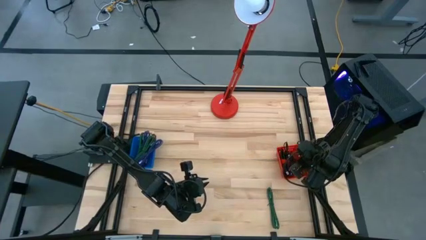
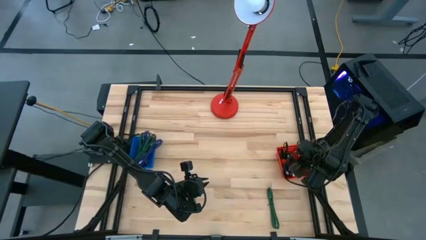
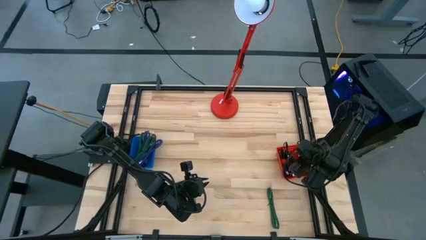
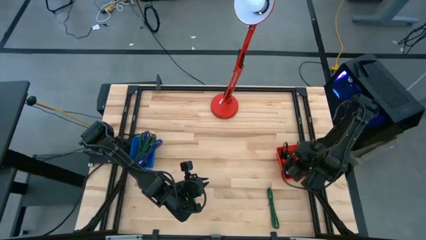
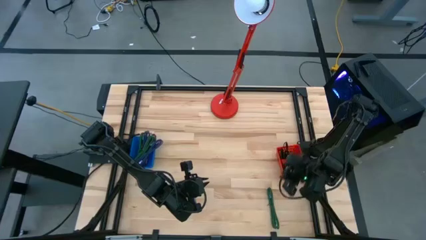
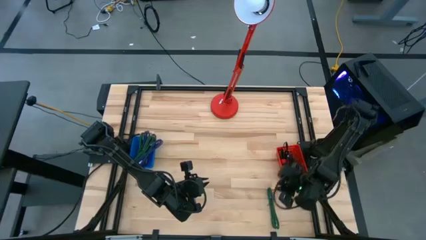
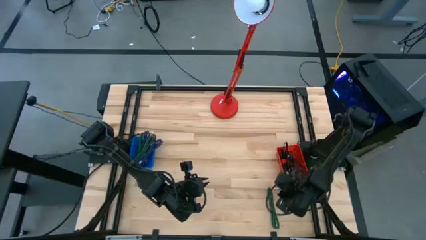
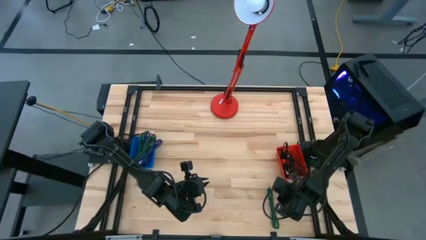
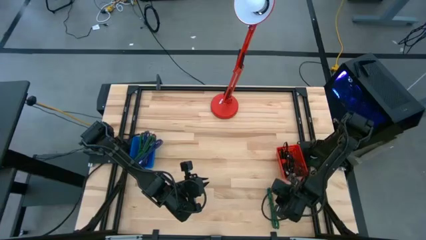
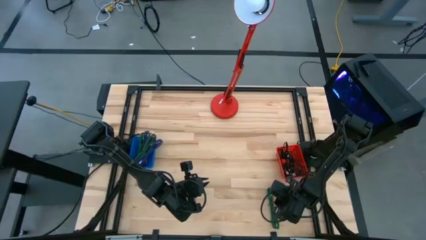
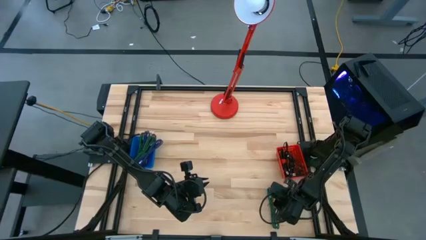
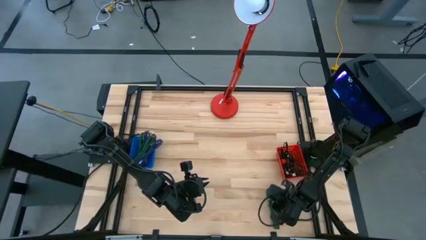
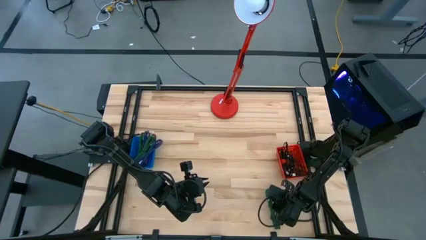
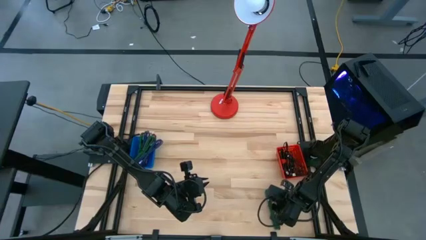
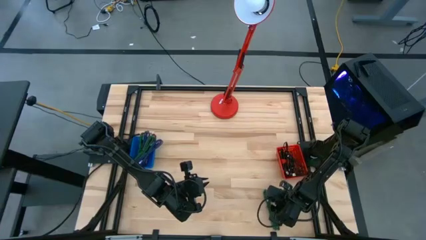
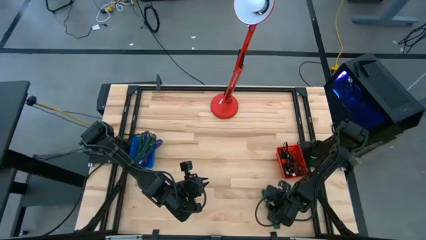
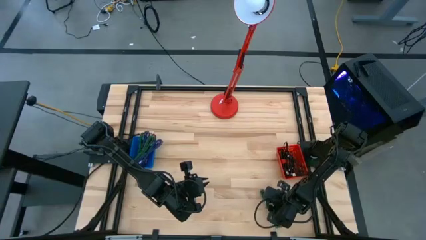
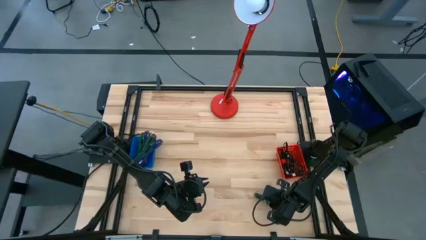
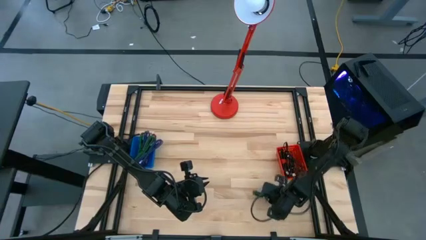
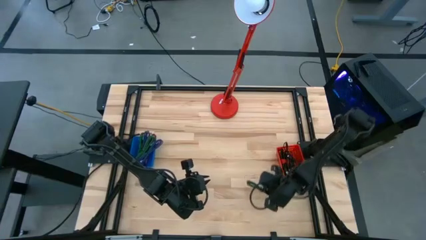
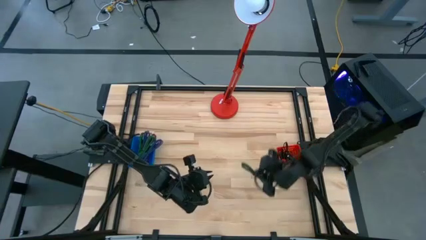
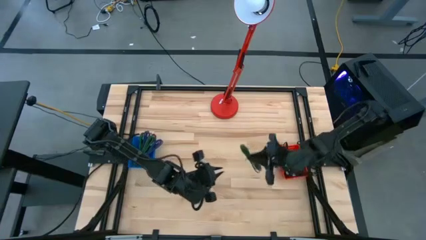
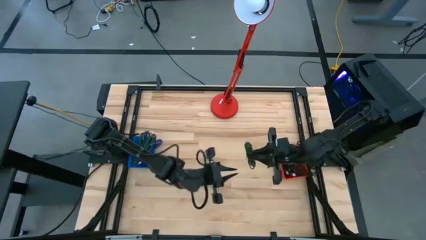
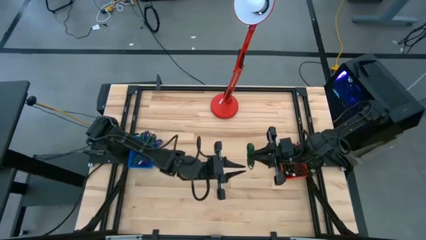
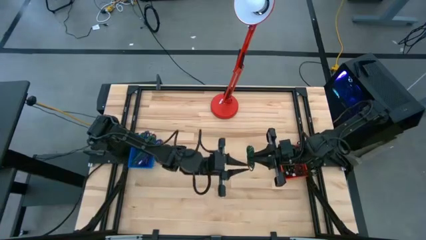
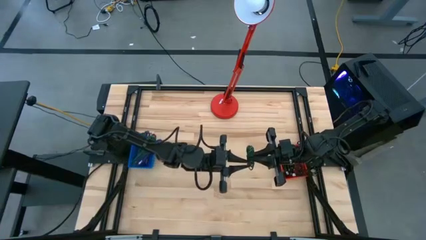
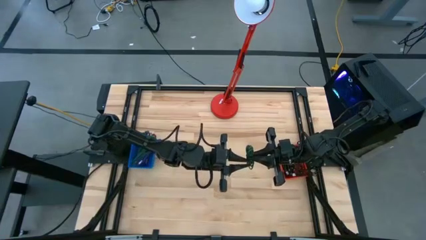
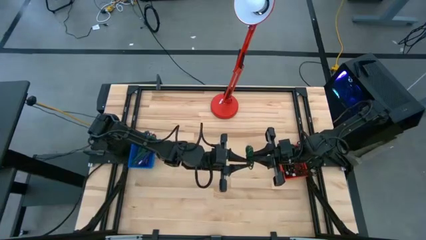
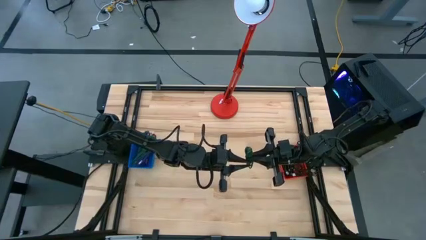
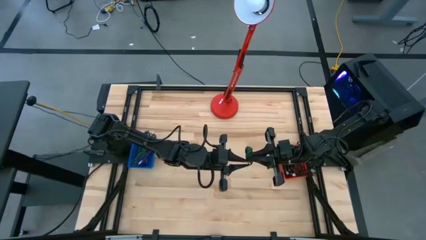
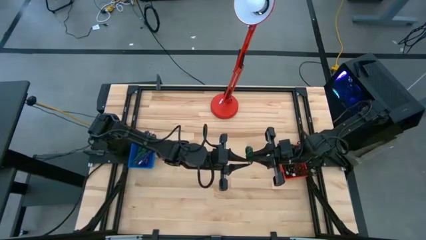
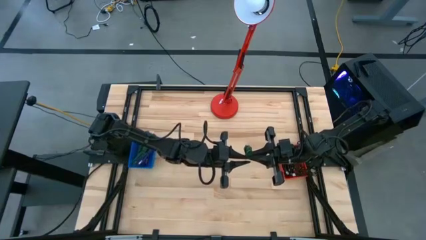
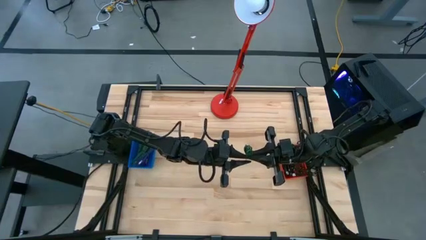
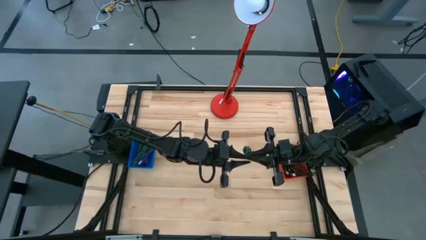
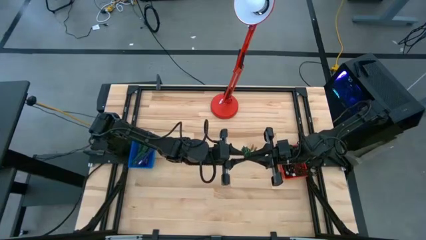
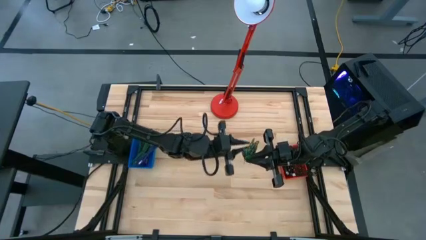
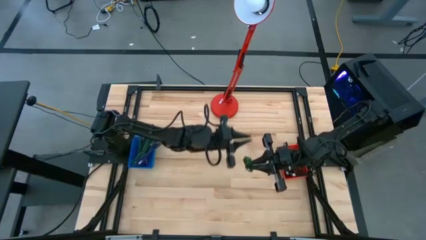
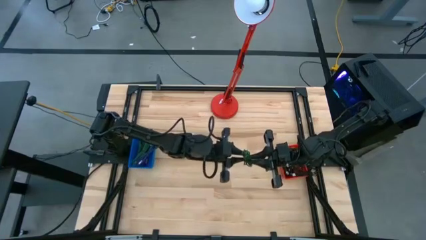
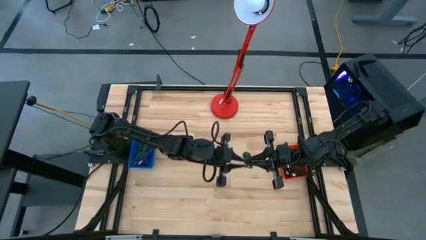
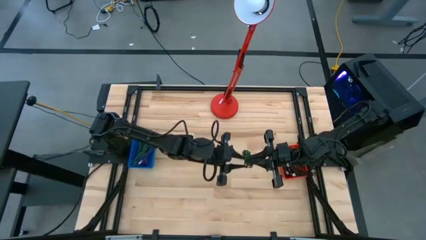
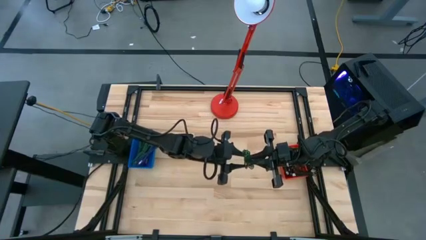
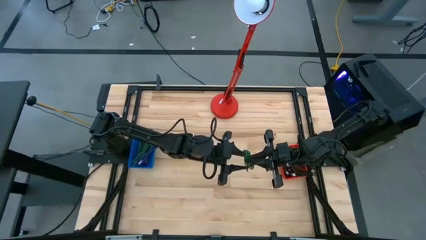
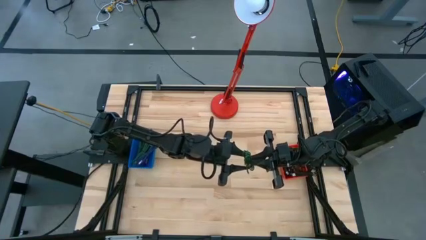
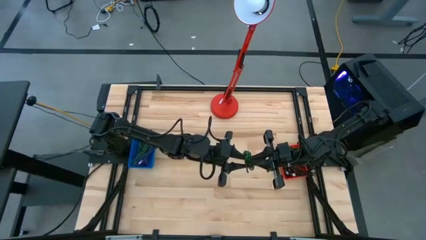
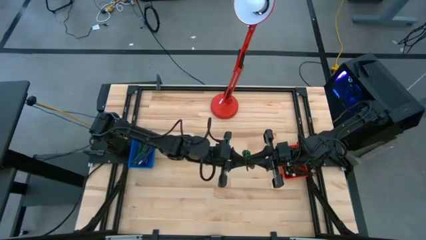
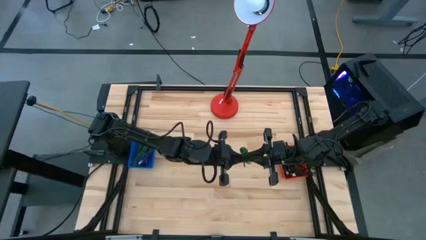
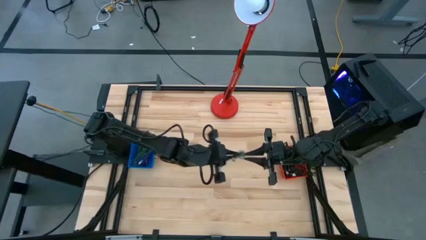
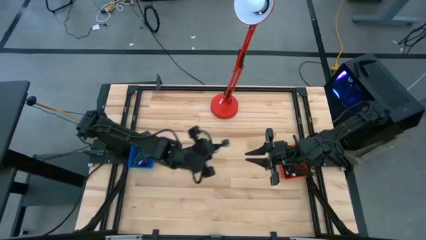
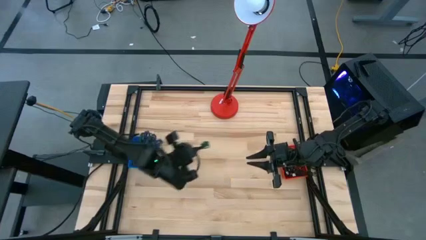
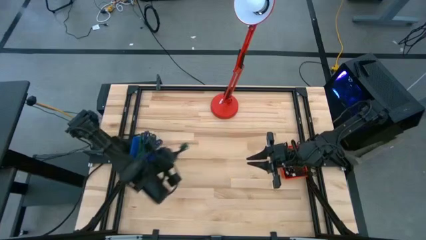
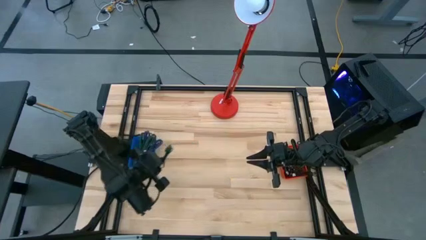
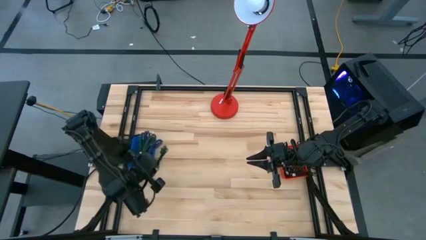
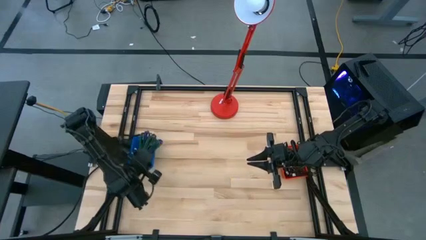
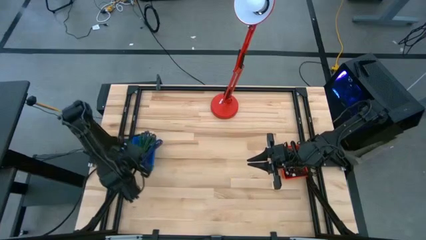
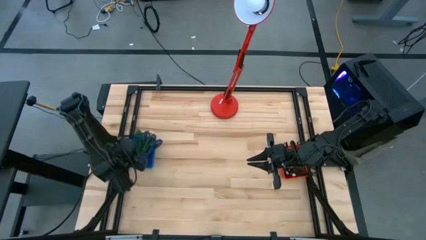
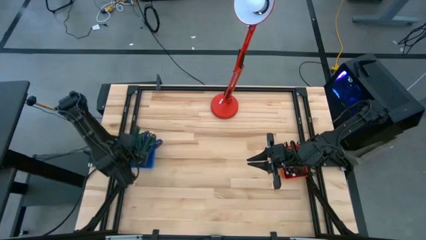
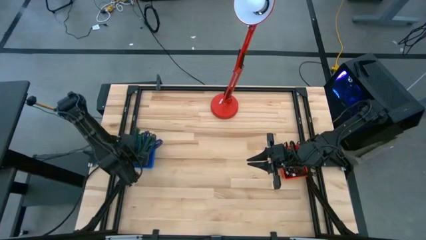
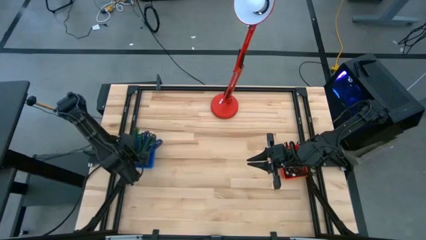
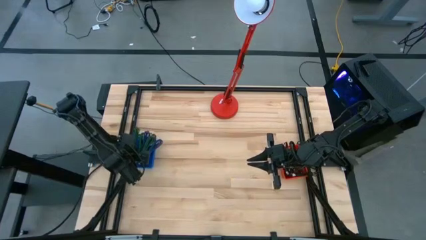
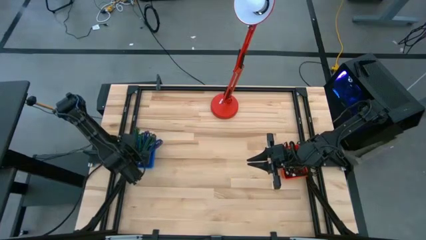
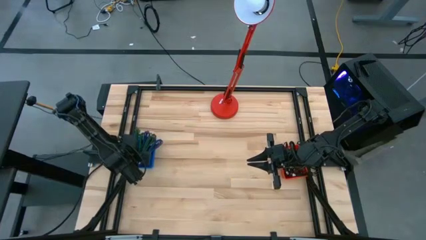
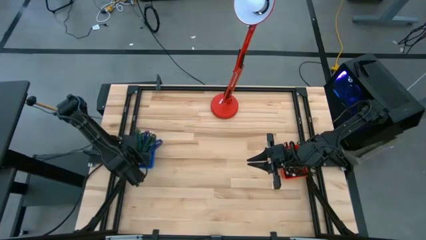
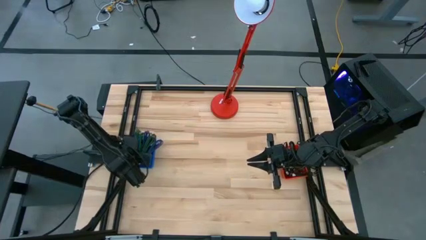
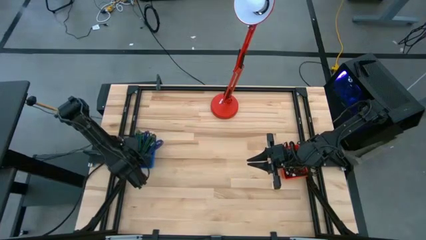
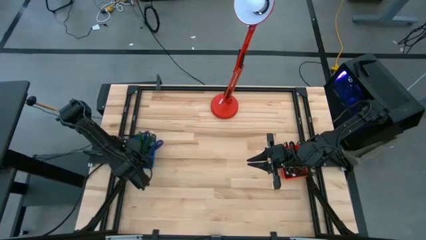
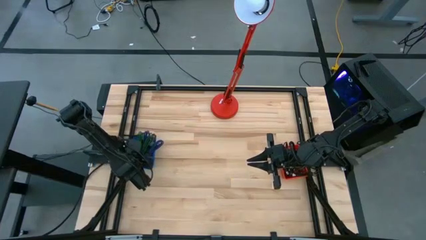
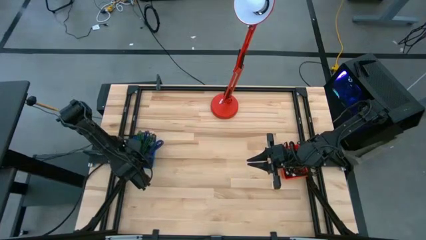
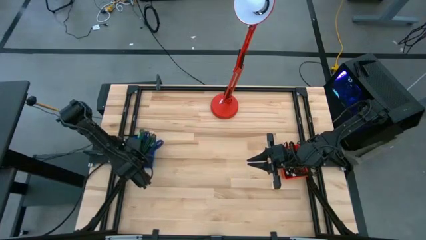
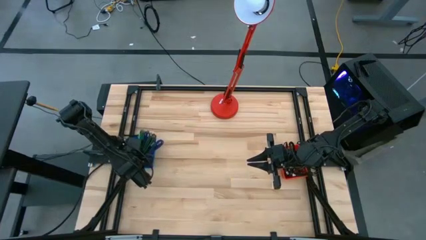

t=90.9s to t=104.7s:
Task: Pick & Place USB Port
Put the green and black charger cable into the blue bin
